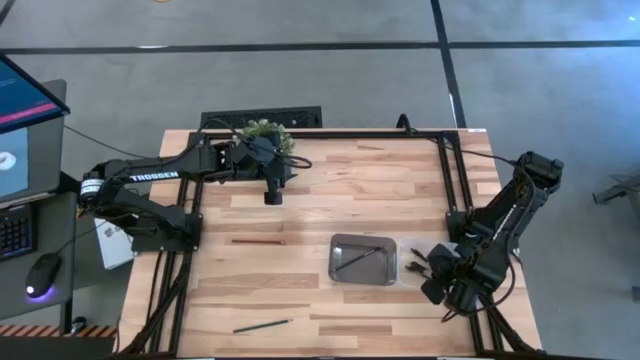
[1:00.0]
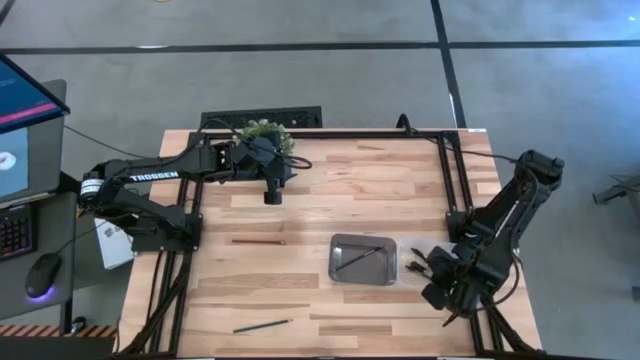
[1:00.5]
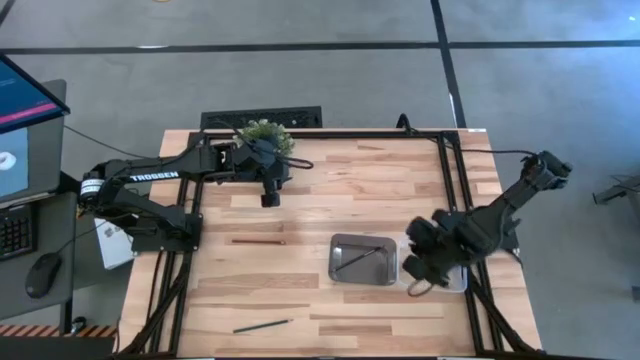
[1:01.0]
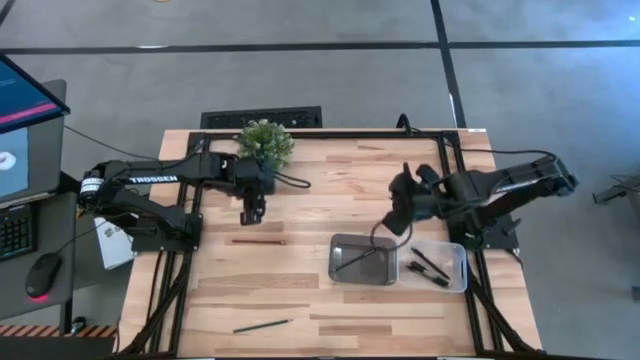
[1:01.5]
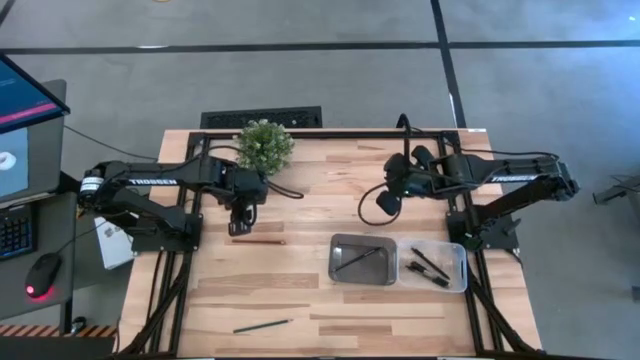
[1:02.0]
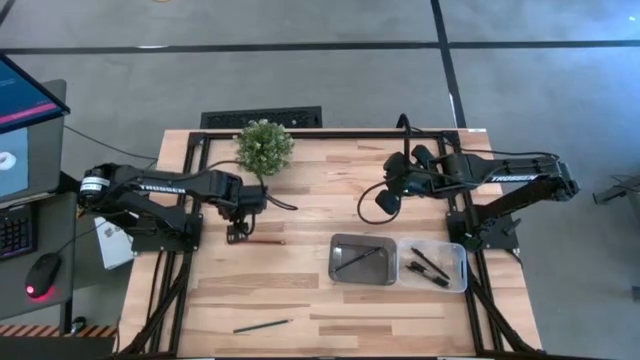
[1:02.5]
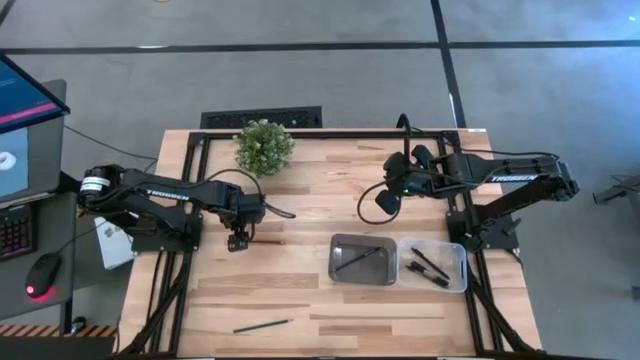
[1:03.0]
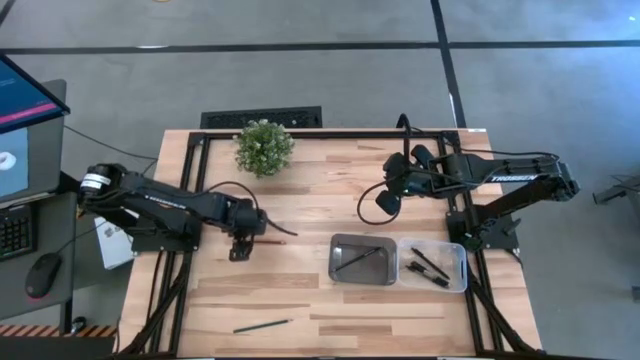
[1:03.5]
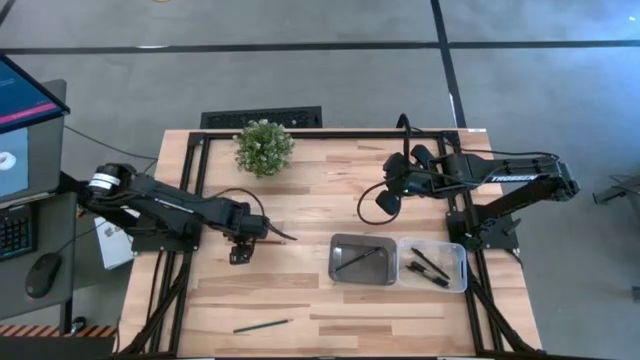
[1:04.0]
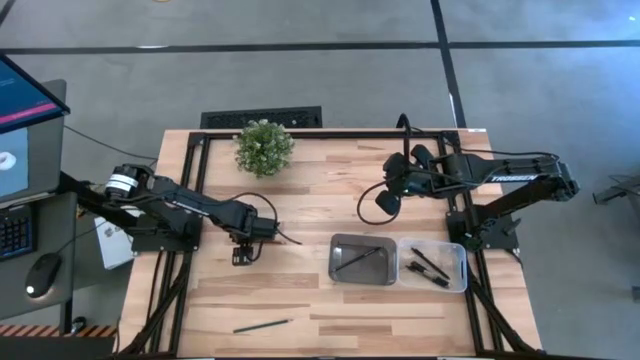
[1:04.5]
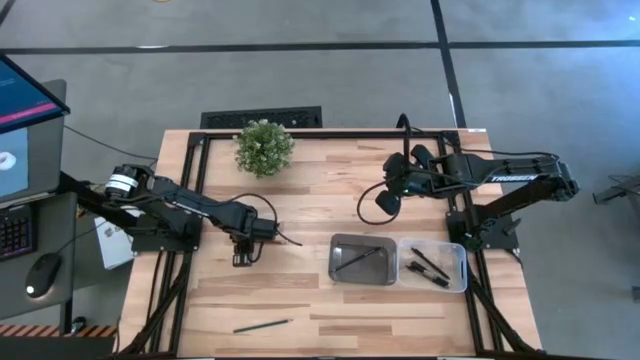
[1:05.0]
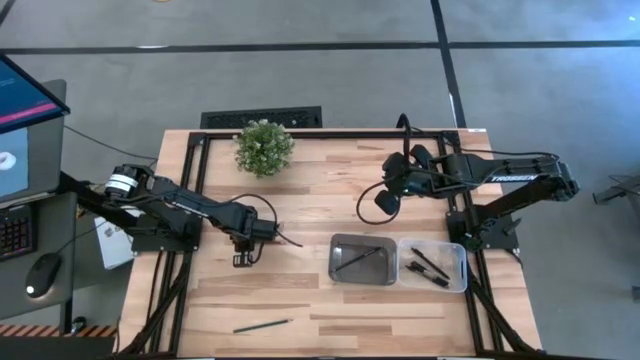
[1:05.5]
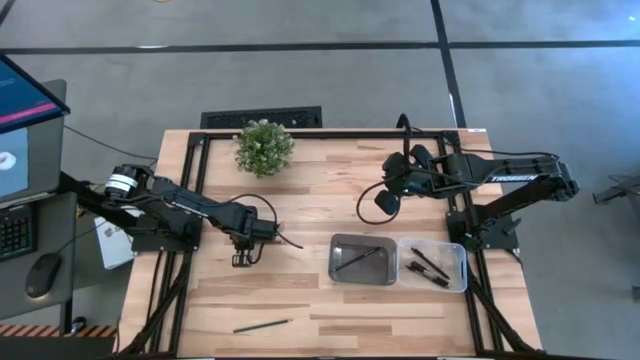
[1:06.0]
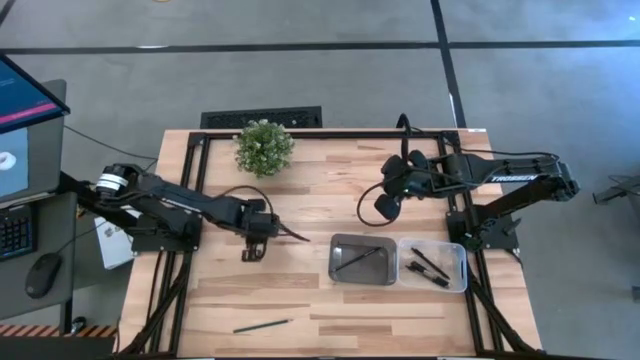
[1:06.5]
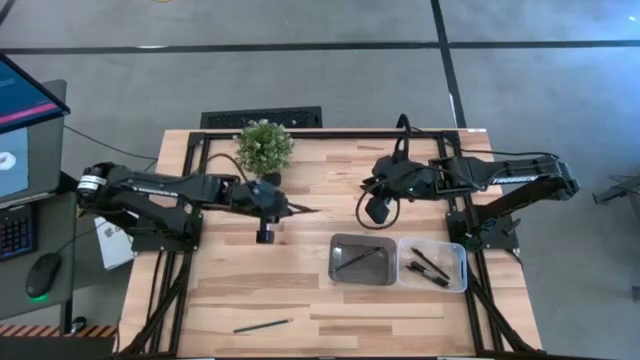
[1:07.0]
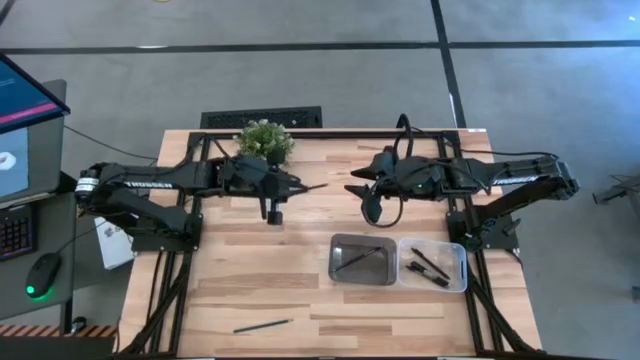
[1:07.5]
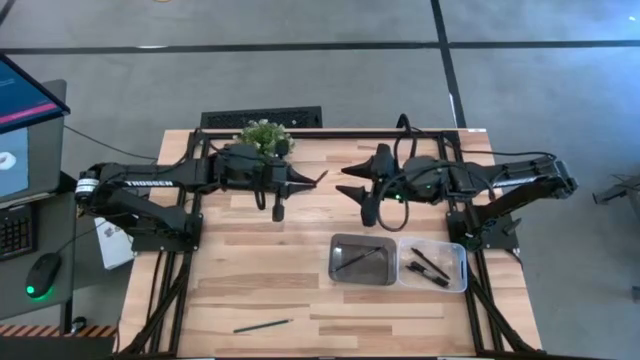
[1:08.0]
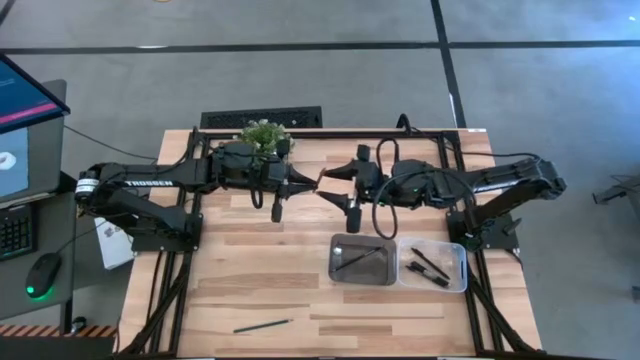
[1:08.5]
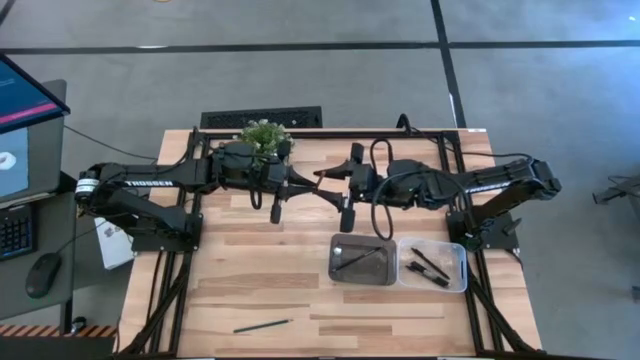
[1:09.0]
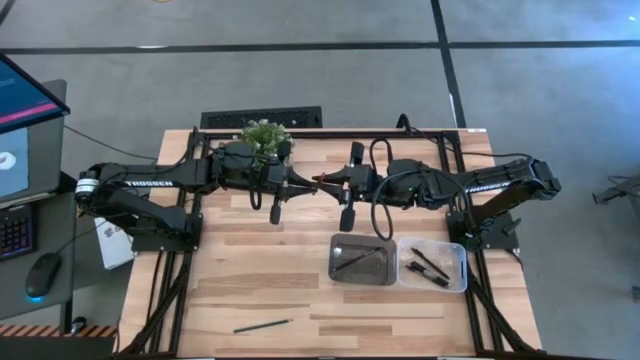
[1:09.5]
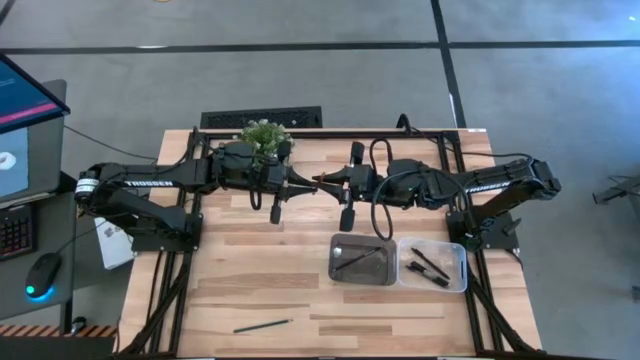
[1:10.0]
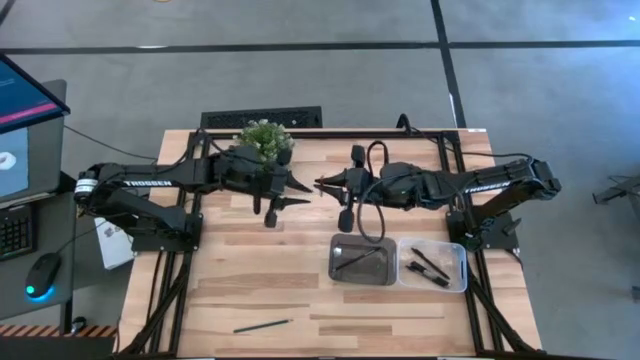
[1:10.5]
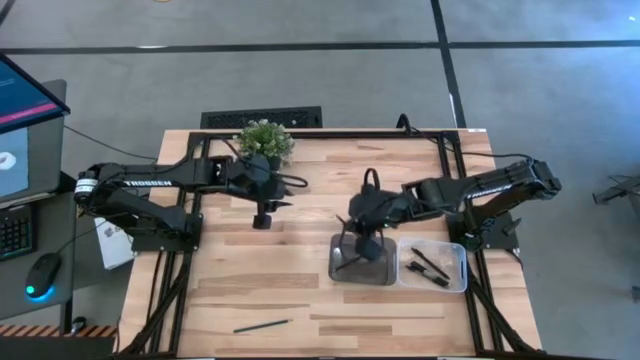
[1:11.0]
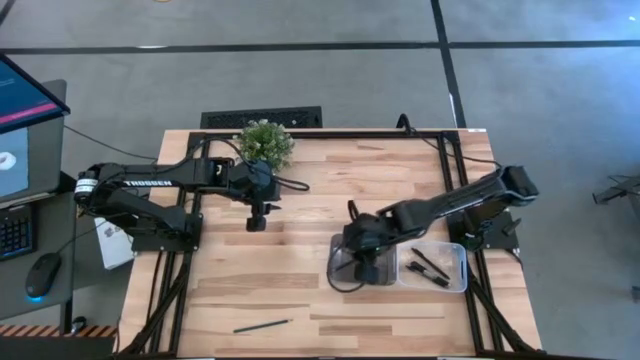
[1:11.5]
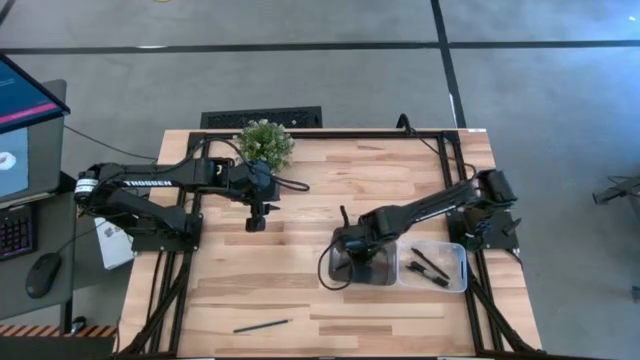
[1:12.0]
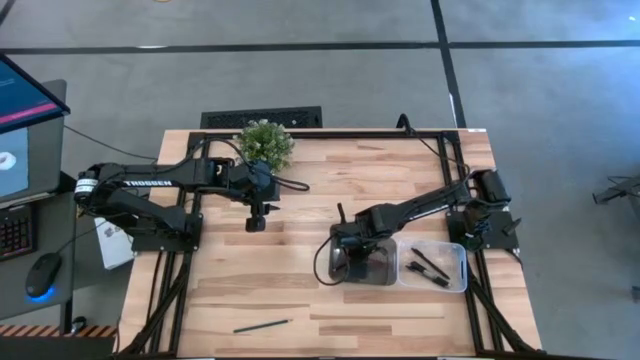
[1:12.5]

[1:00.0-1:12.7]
Task: Sort pens & pencils
Put the brown pencil into the black bin

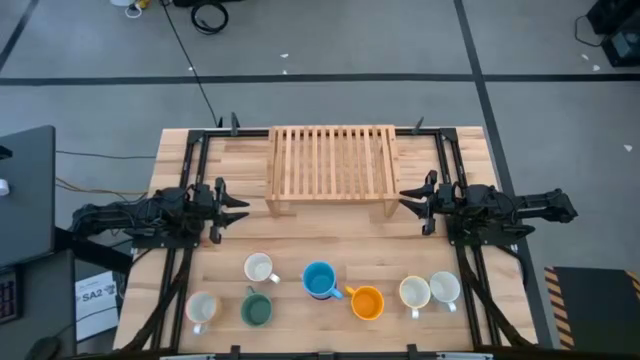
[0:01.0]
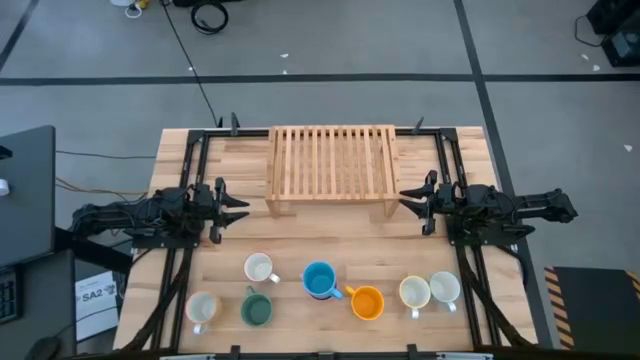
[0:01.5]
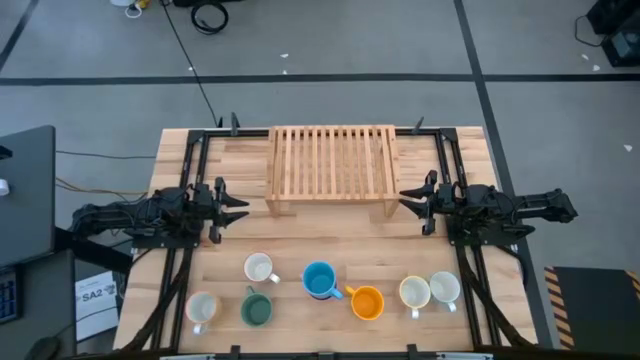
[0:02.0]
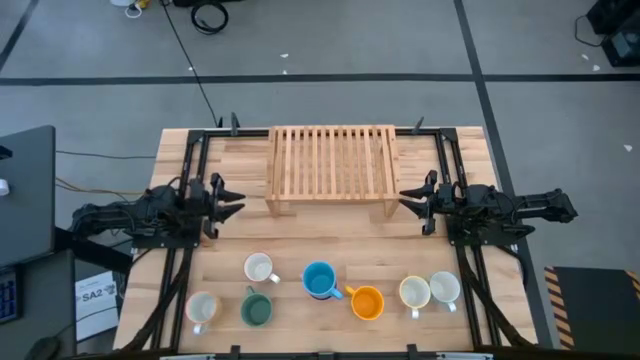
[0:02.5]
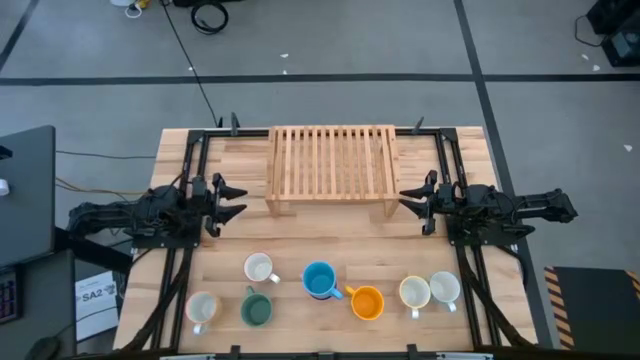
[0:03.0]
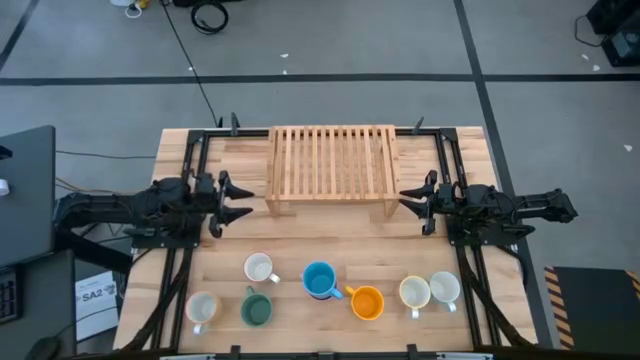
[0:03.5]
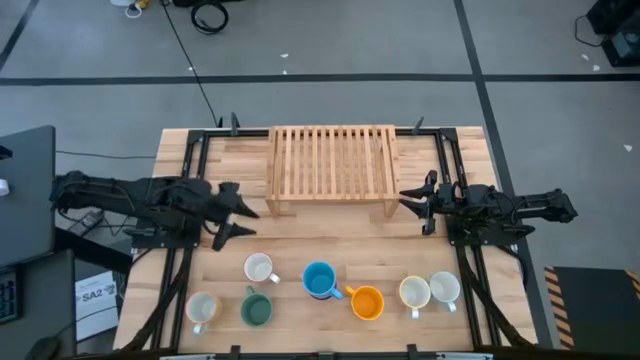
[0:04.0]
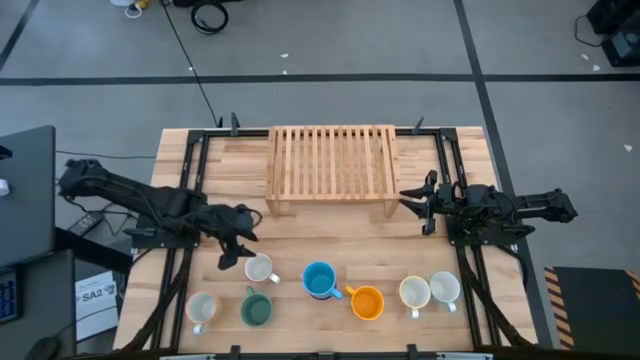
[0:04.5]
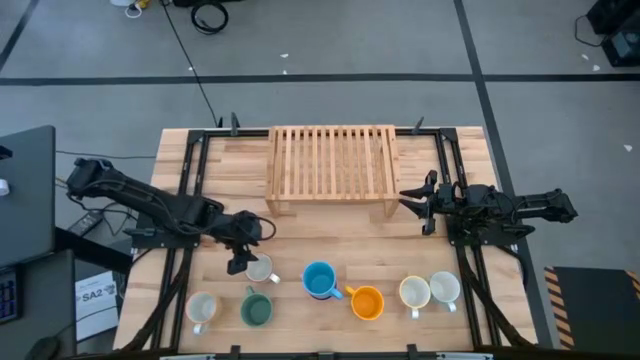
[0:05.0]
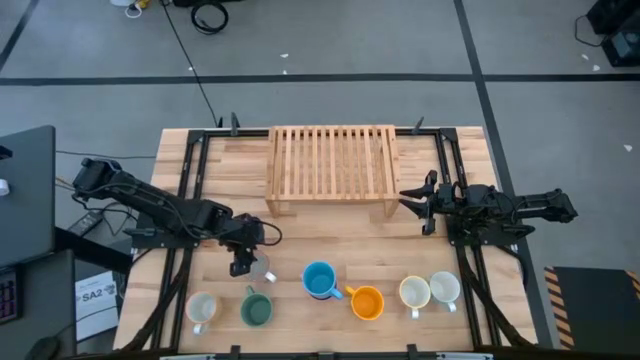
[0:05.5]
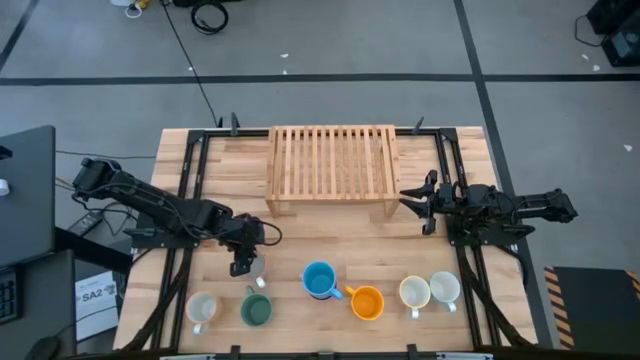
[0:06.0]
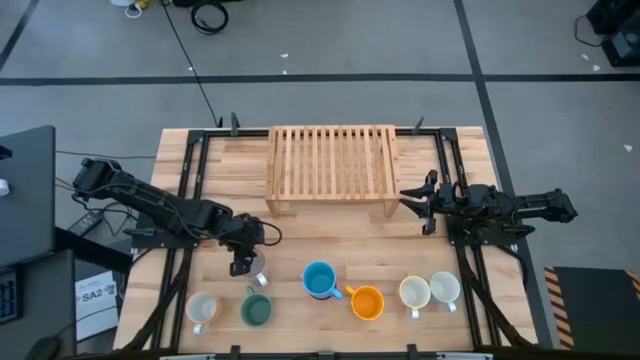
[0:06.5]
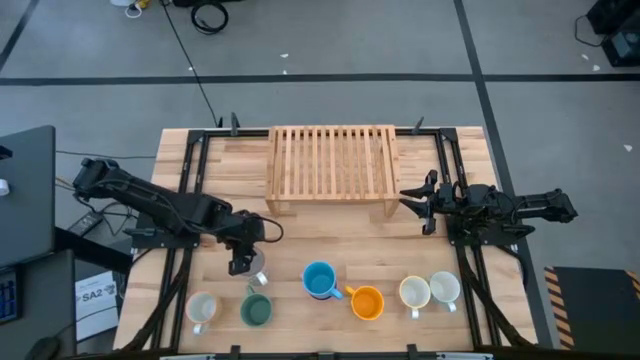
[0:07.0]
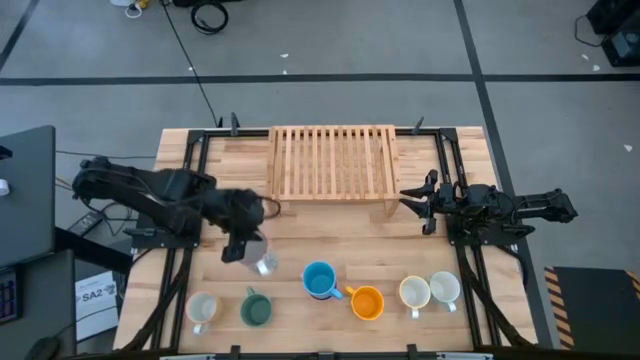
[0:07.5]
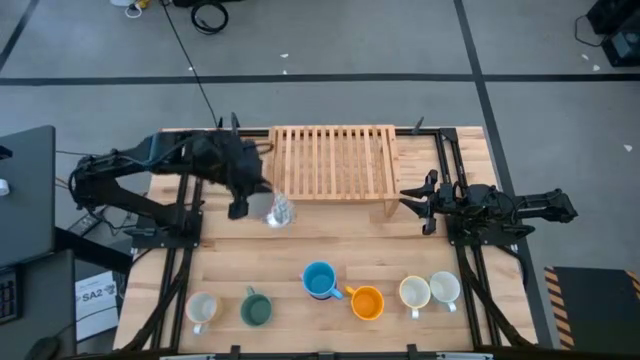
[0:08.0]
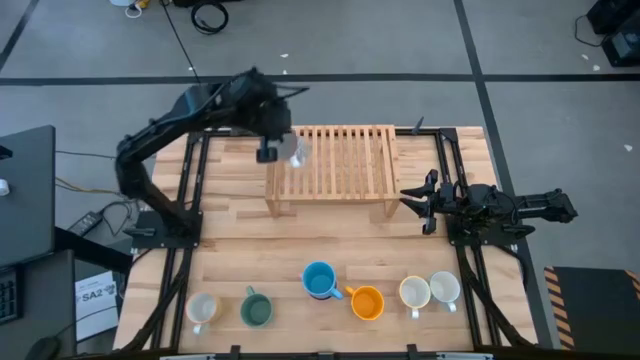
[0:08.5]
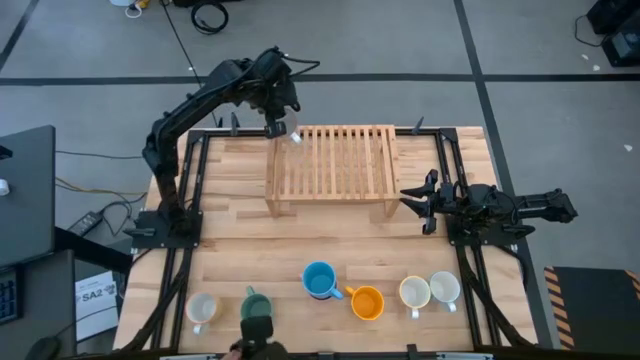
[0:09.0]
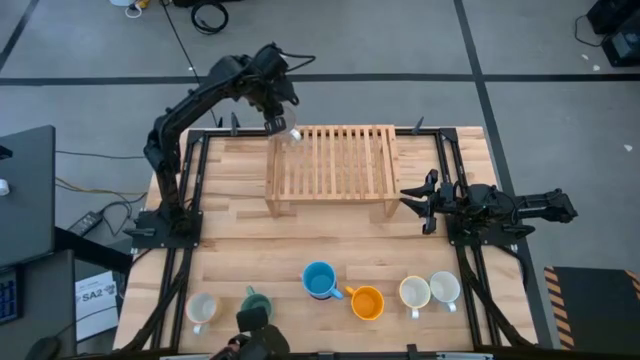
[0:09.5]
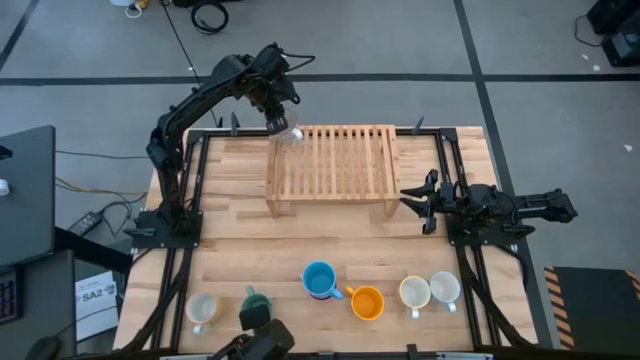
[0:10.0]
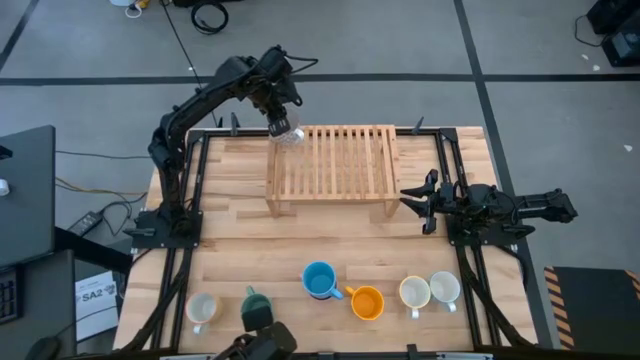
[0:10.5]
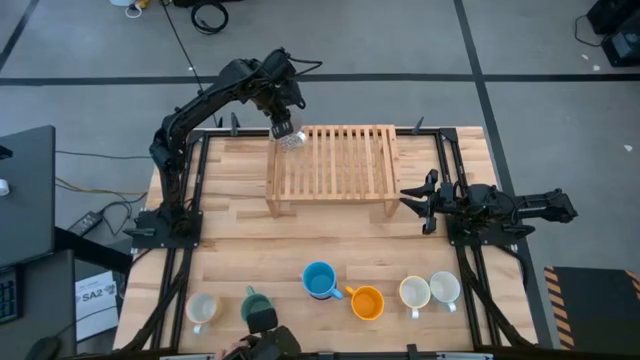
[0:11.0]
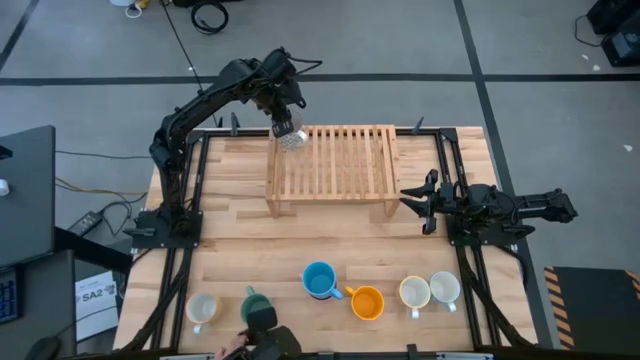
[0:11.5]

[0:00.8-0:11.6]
Task: Place coffee mugs
Put the gray mug on the shelf
